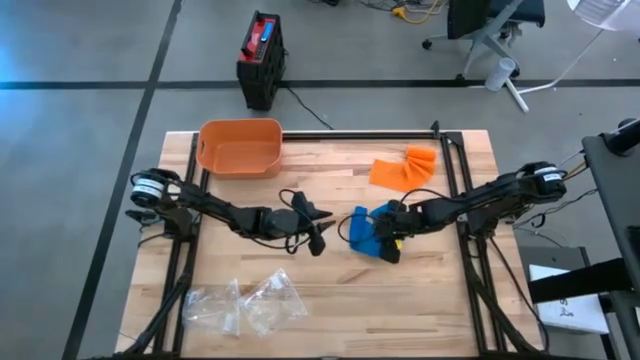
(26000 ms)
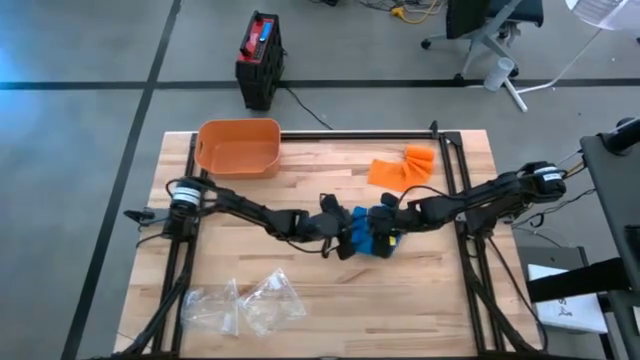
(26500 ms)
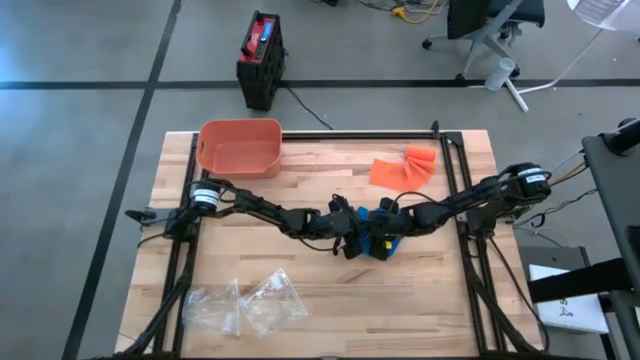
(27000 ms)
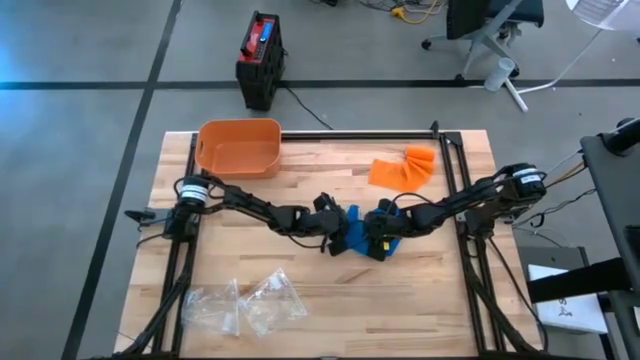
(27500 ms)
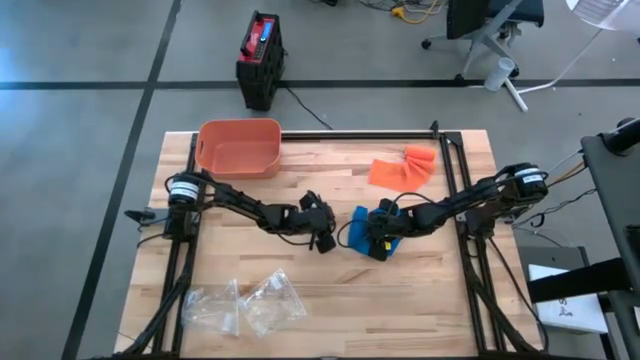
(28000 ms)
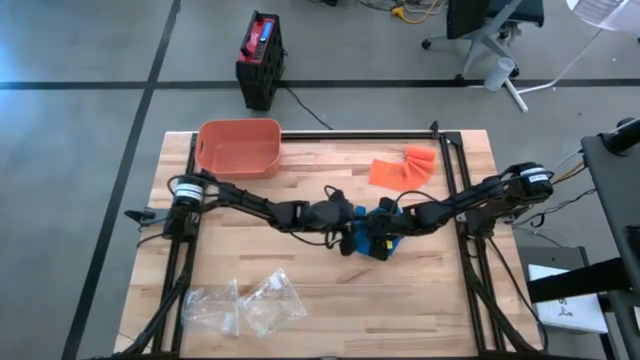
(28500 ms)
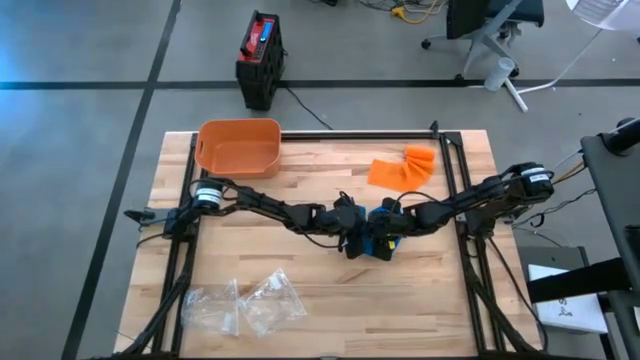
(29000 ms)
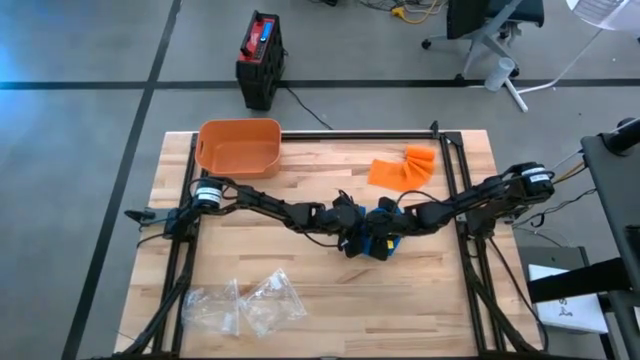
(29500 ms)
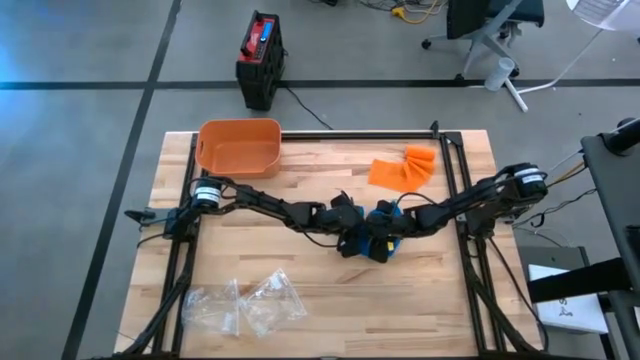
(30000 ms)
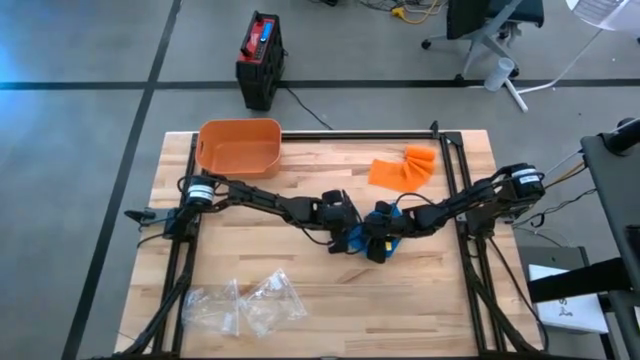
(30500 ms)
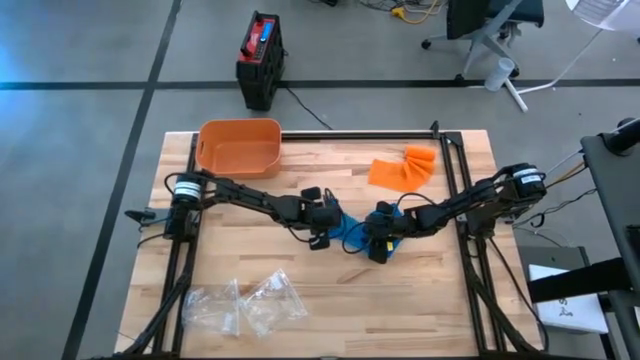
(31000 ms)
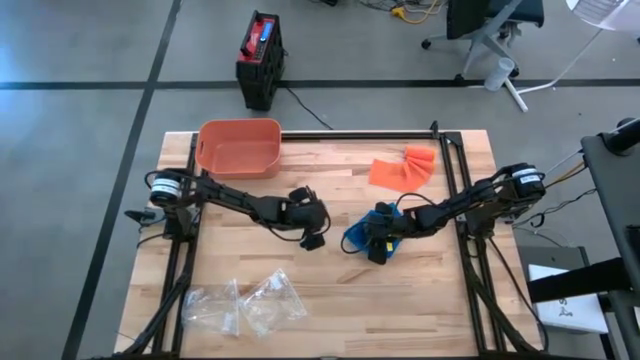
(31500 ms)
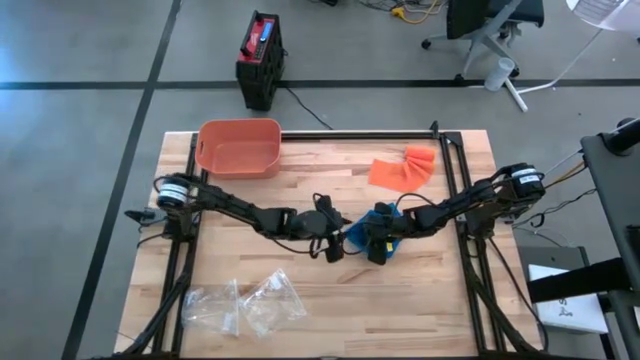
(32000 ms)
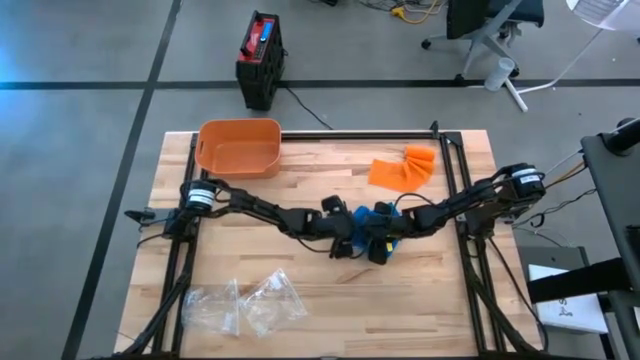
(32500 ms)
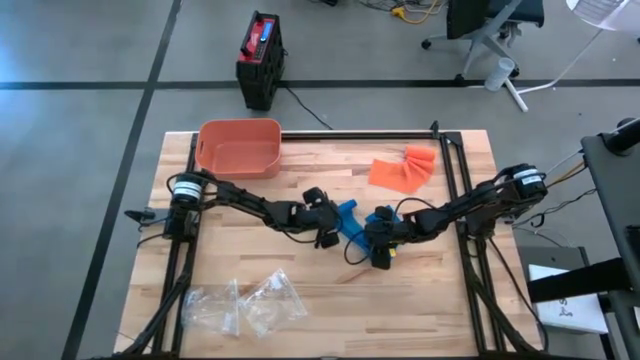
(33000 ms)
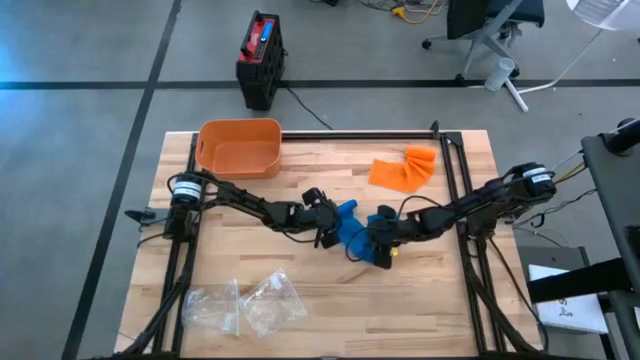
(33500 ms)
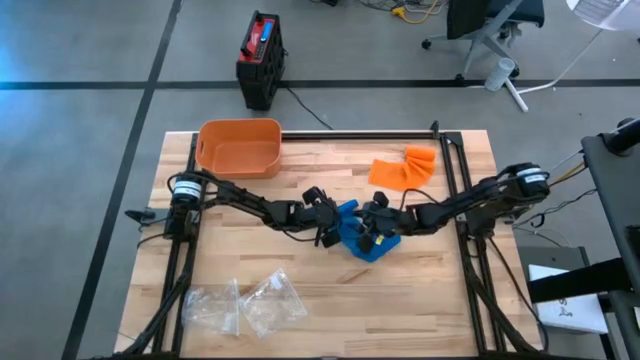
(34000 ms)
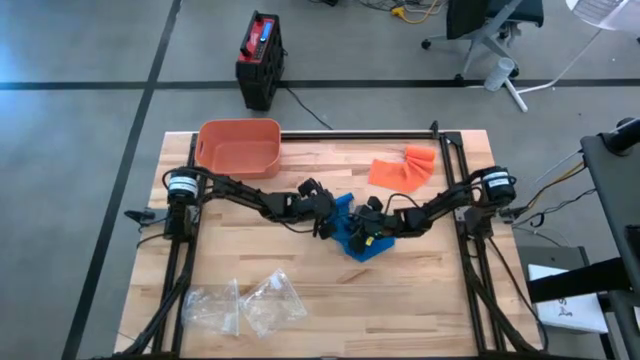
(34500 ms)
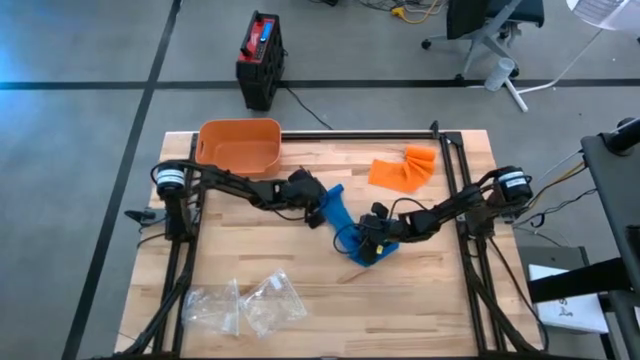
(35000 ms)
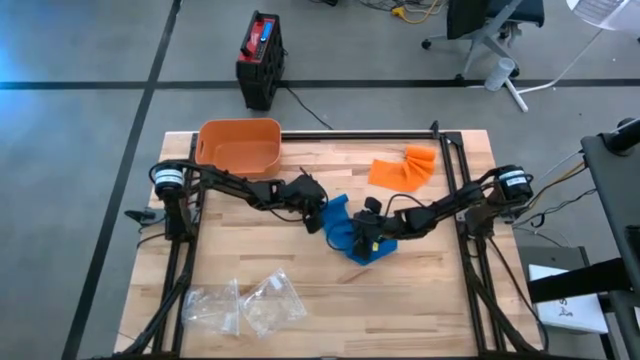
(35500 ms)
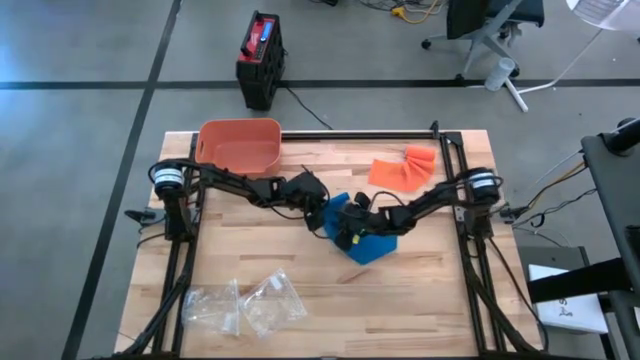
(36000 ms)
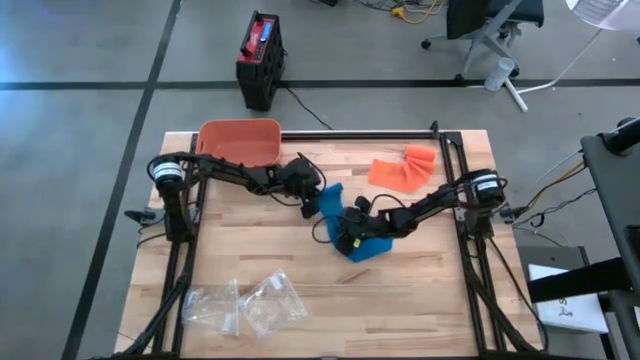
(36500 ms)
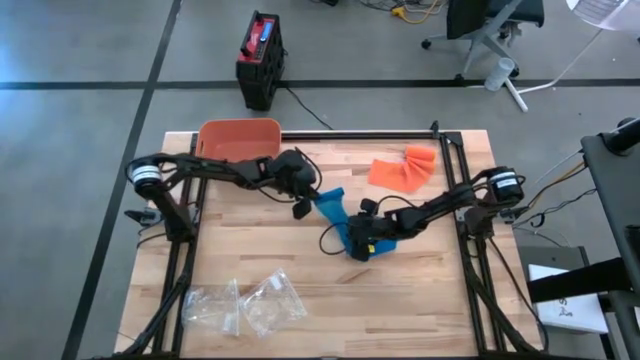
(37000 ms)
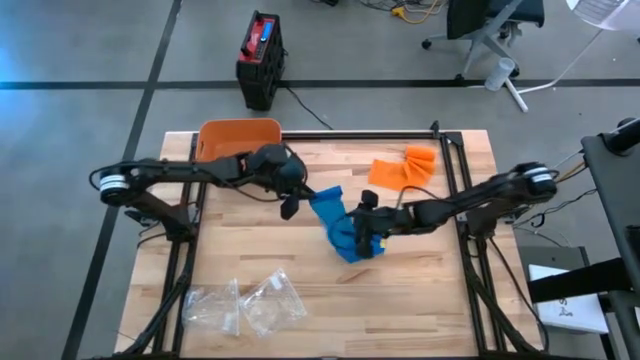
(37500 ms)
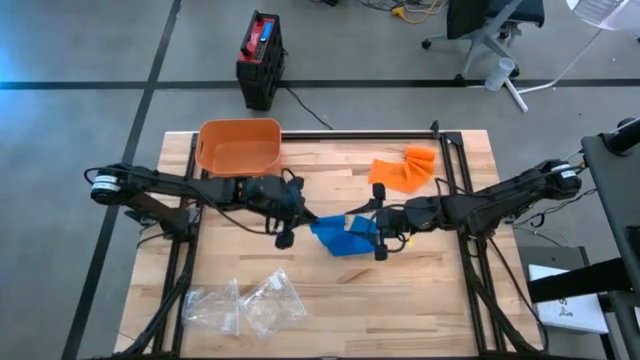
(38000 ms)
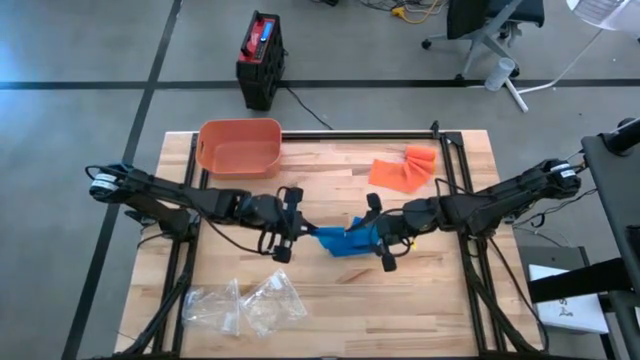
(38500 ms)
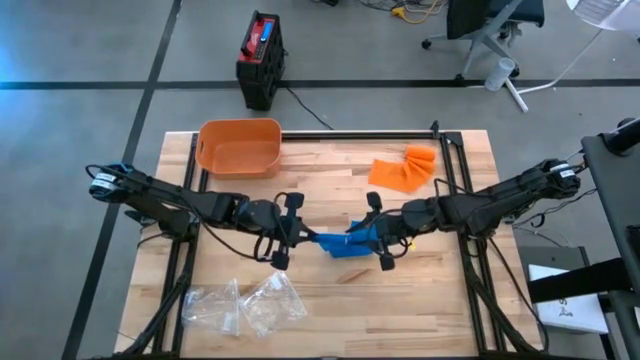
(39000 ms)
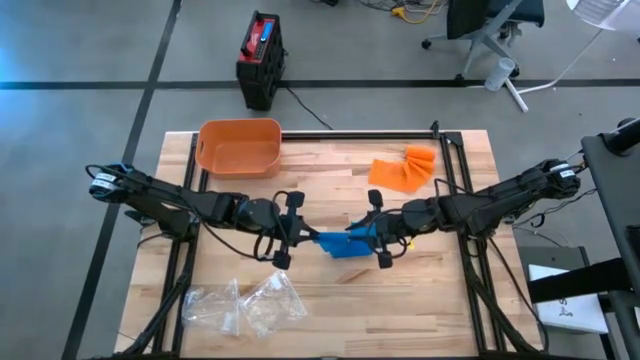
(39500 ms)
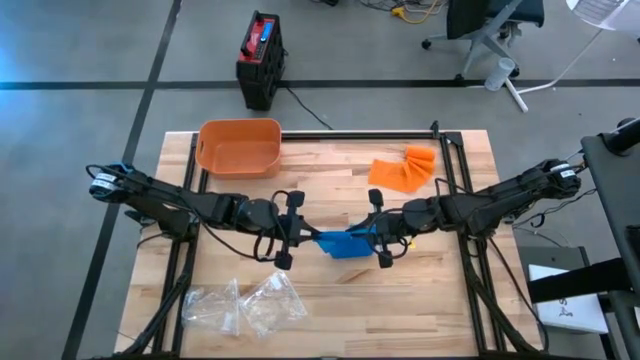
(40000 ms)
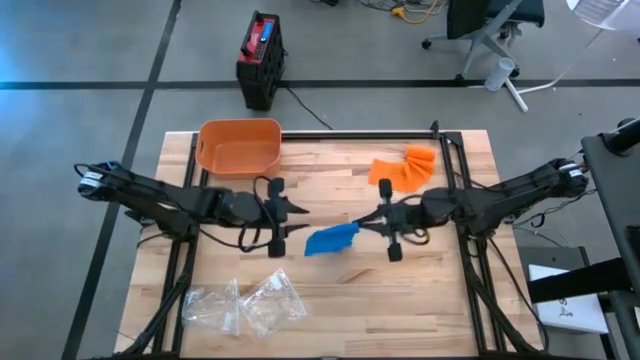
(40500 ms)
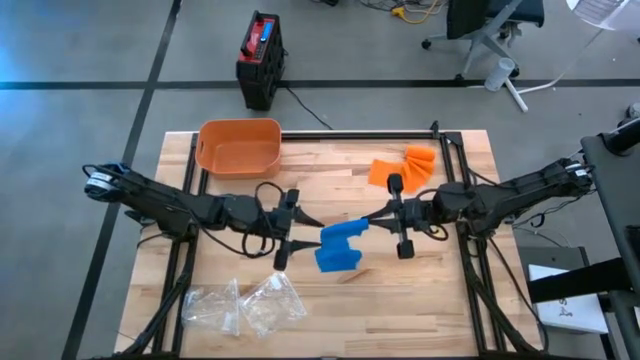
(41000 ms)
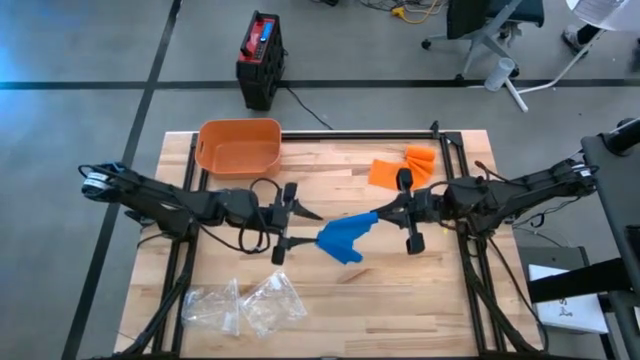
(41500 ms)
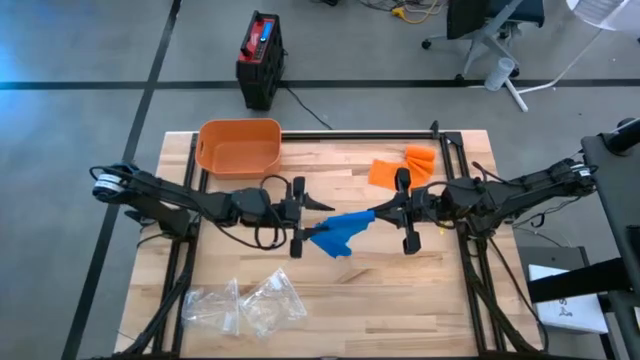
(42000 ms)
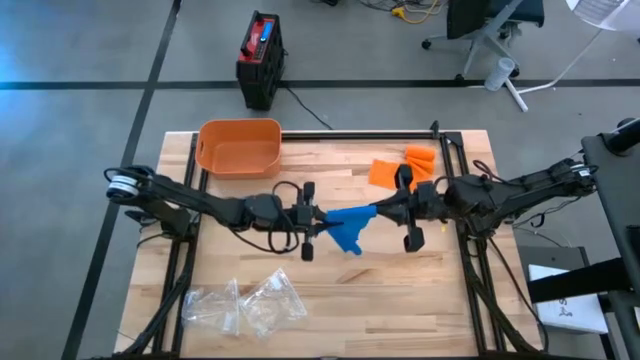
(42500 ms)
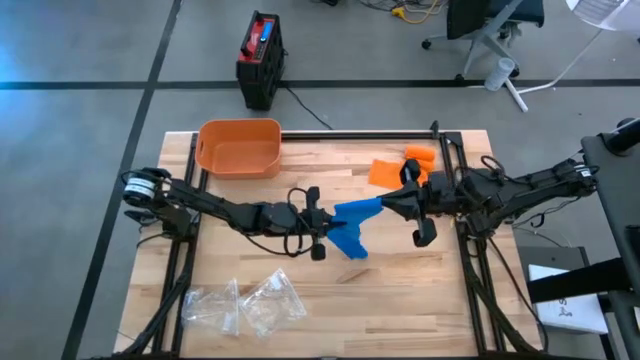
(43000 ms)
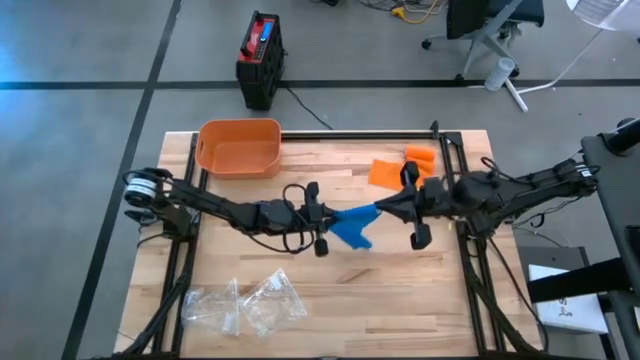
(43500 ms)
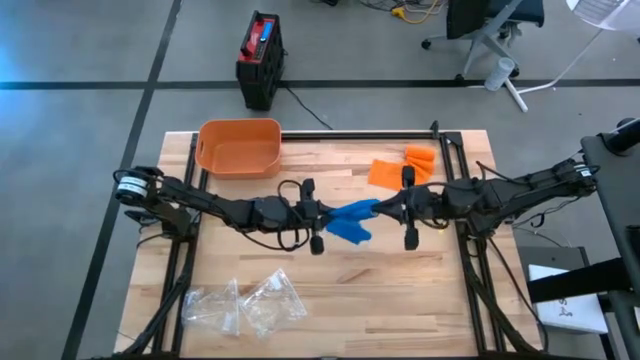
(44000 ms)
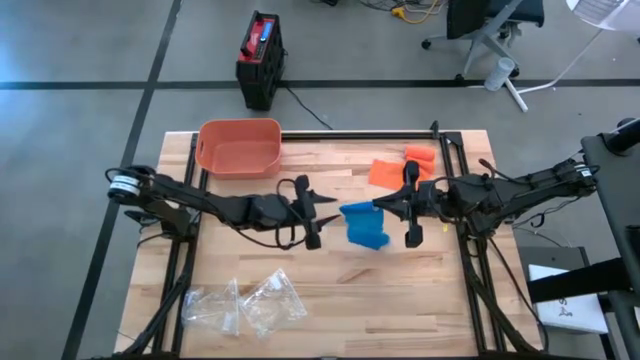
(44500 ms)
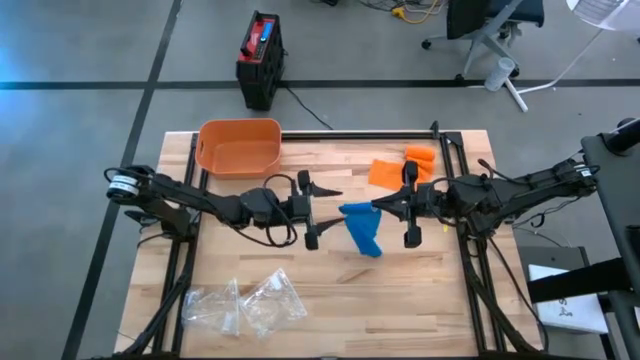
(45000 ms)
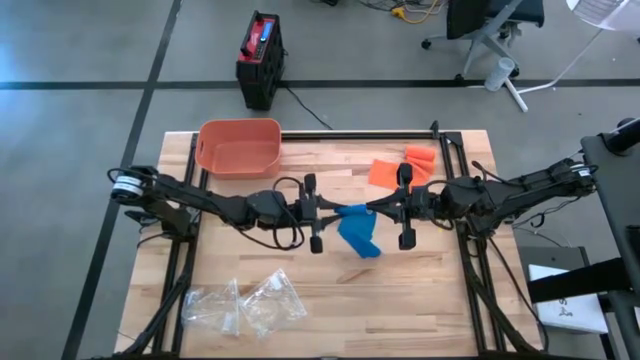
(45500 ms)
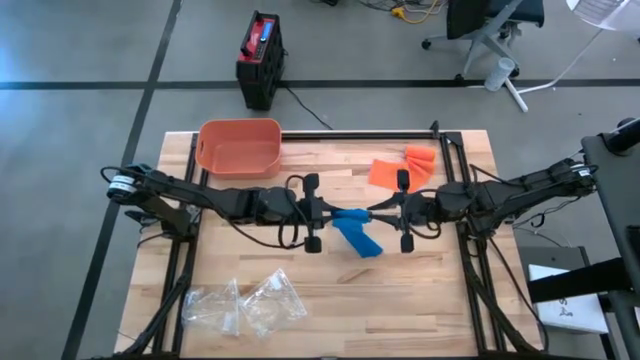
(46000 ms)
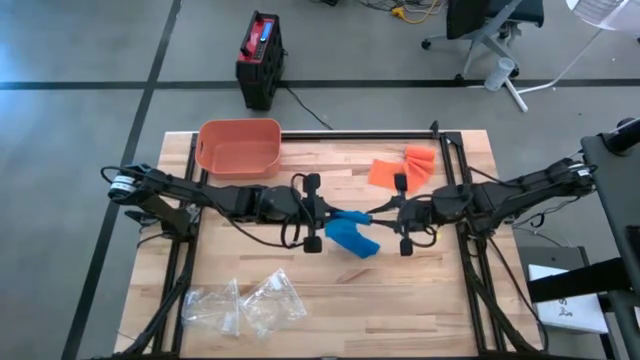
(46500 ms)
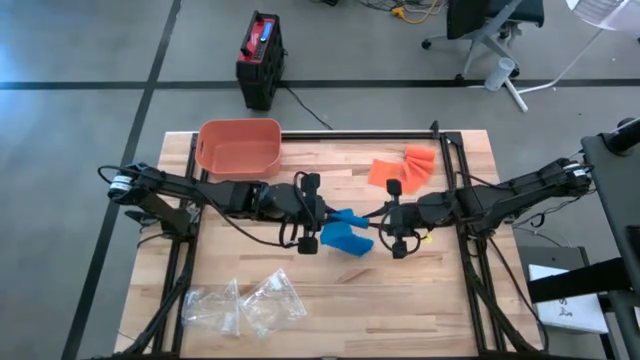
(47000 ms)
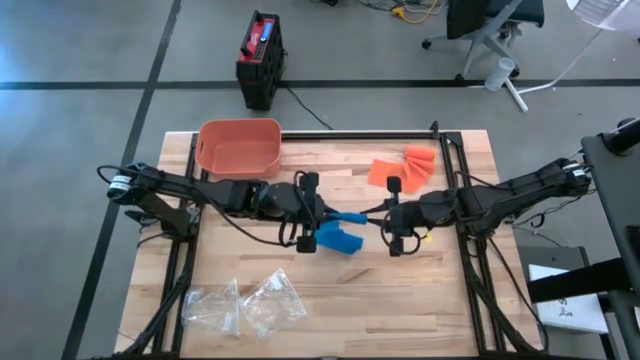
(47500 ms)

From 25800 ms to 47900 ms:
Task: Roll bandage
Roll the blue bandage
